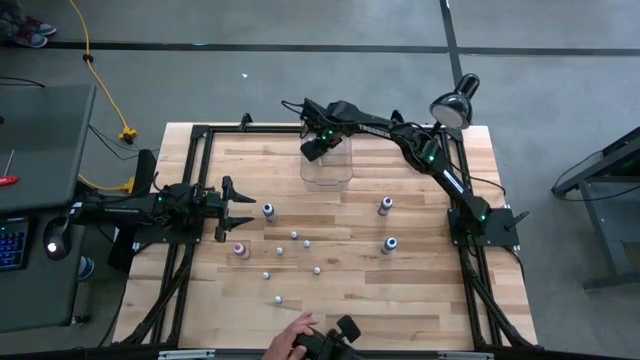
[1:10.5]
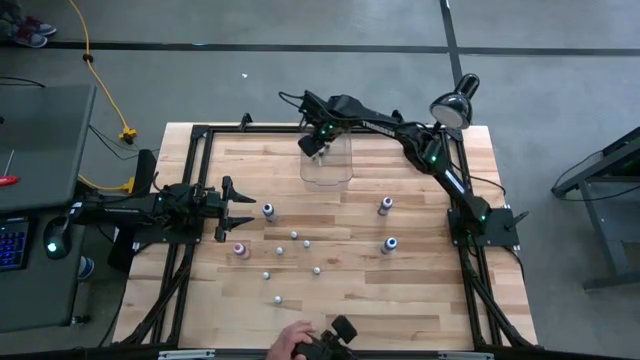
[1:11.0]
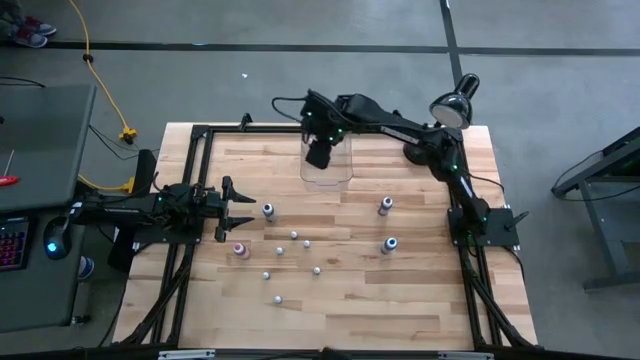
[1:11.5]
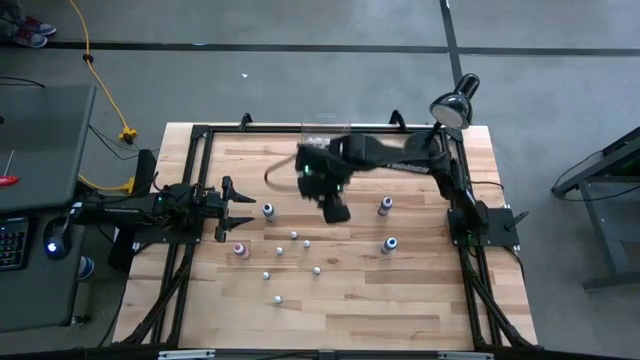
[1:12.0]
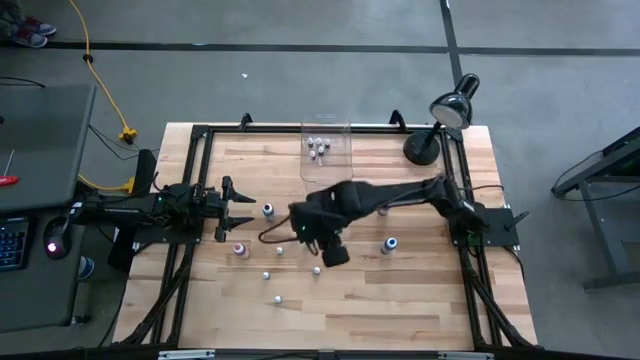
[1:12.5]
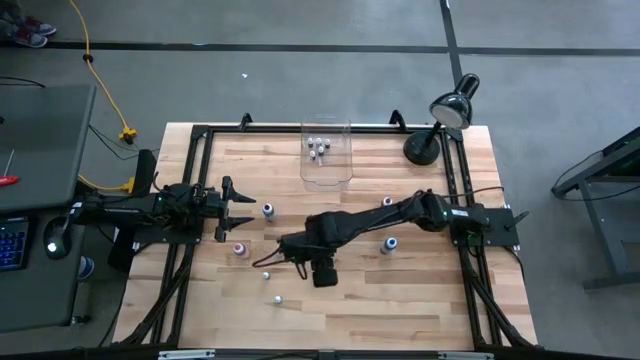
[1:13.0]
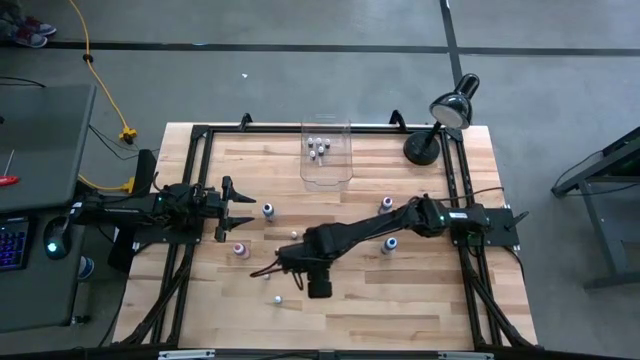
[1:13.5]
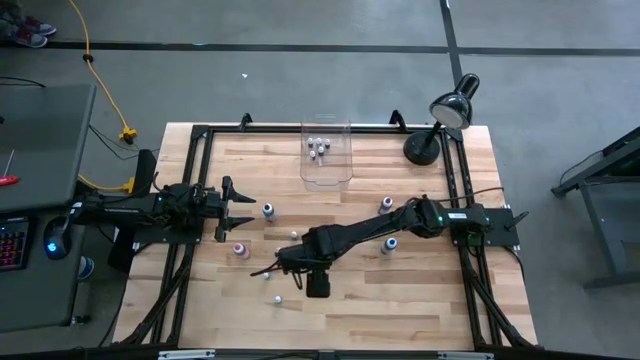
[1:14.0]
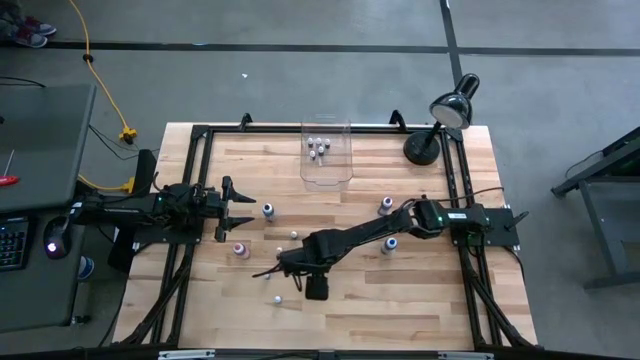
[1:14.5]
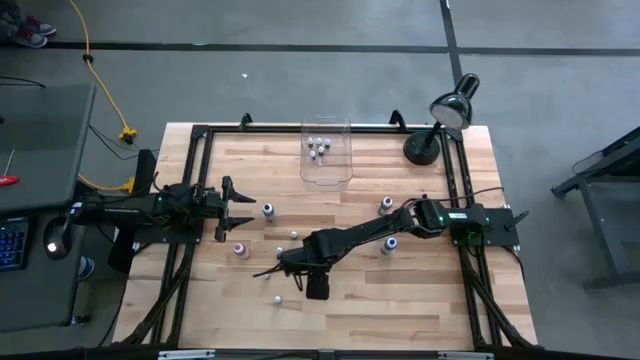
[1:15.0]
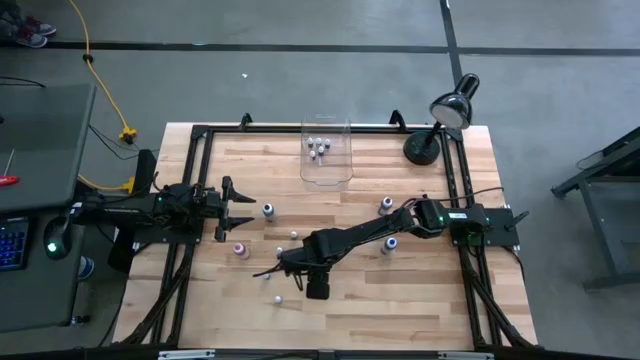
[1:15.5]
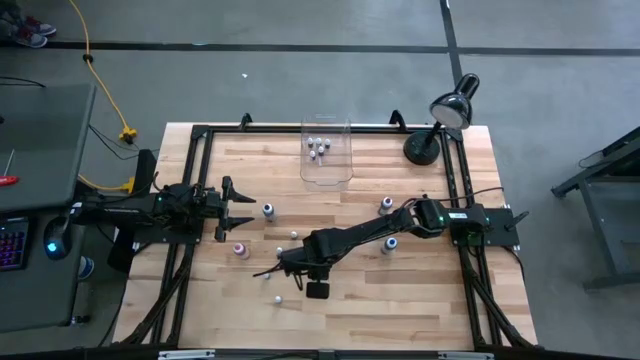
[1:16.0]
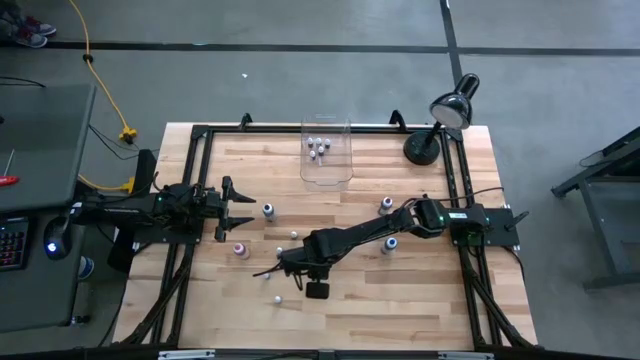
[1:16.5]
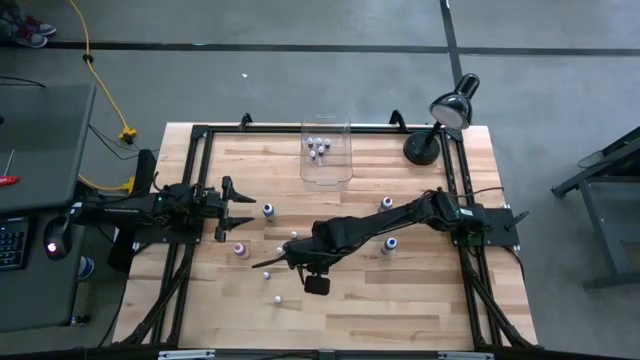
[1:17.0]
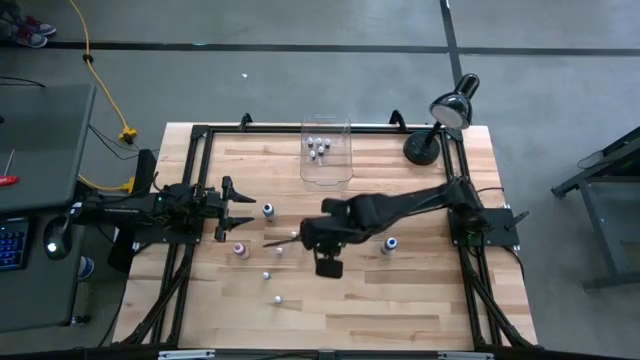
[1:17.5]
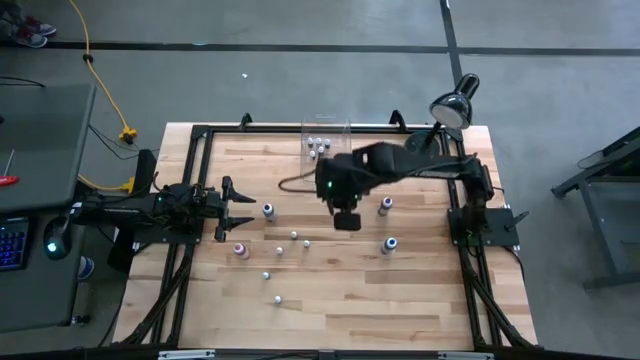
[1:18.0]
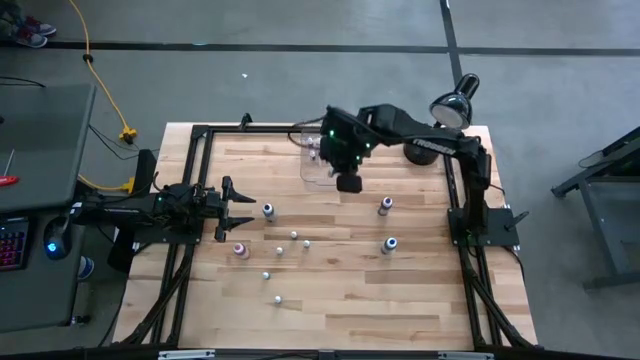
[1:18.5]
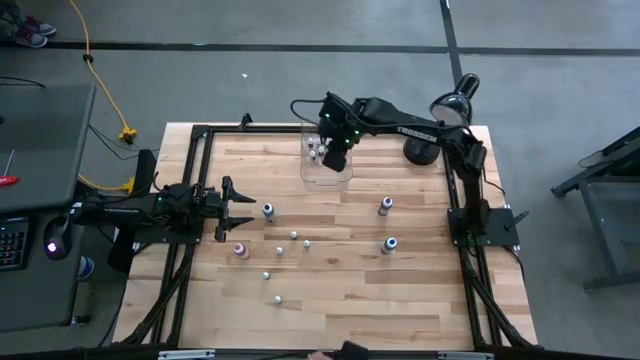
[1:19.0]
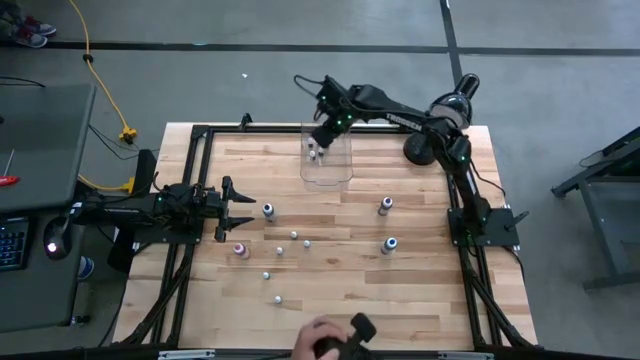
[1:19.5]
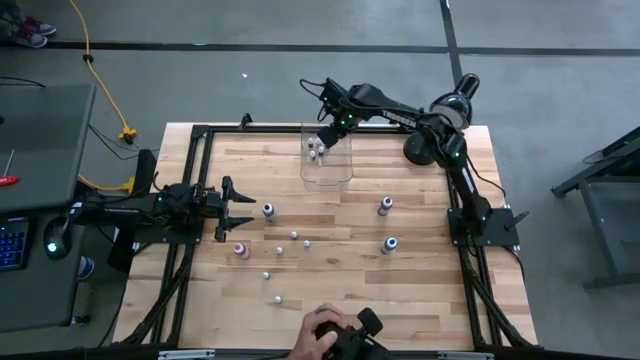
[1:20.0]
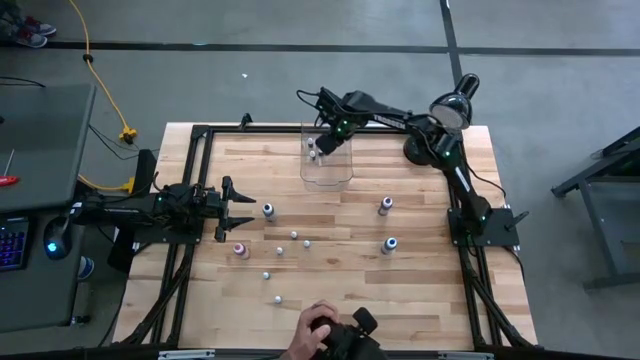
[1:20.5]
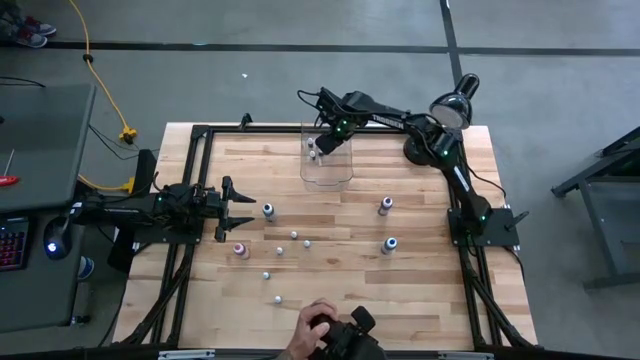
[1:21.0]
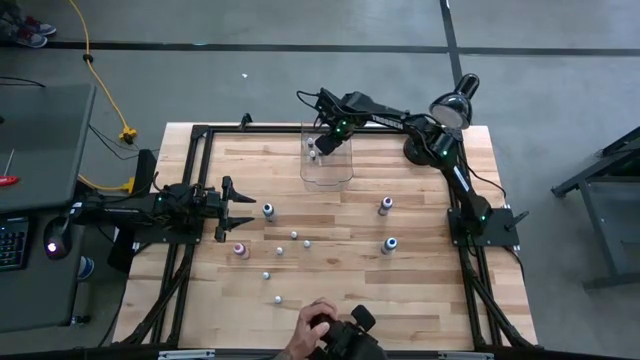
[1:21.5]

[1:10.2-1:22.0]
Task: Pick & Place food coloring
Put the small food coloring bottle into the transparent bin

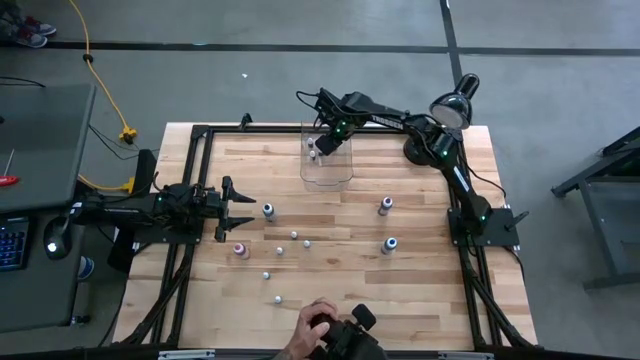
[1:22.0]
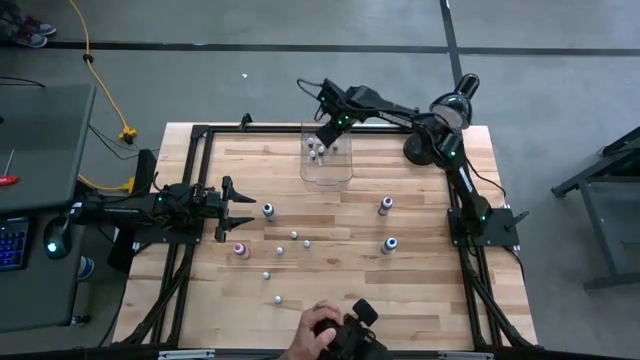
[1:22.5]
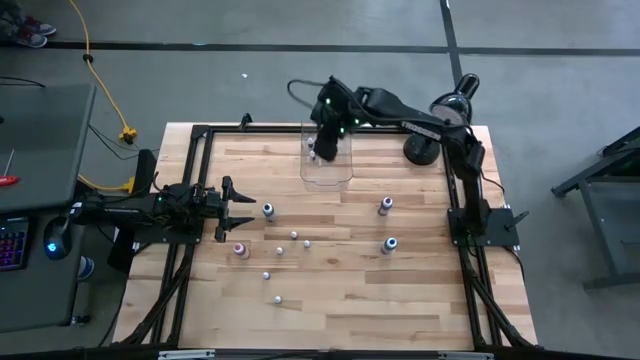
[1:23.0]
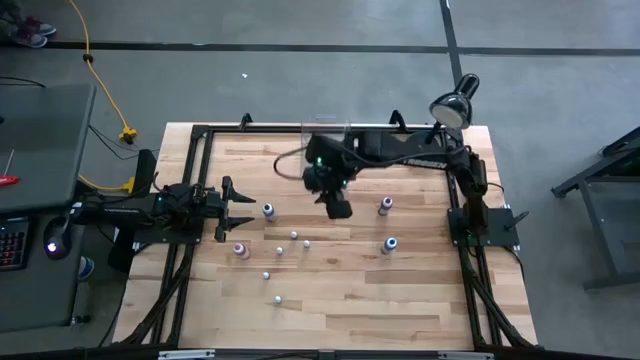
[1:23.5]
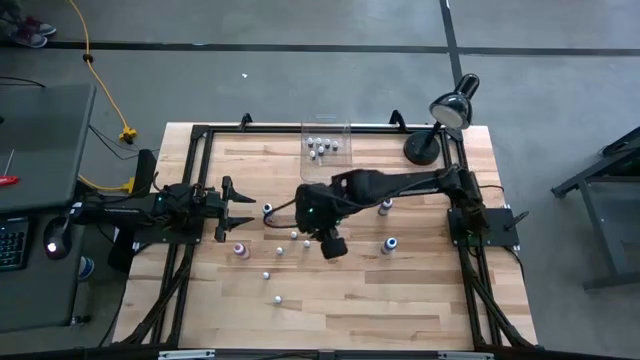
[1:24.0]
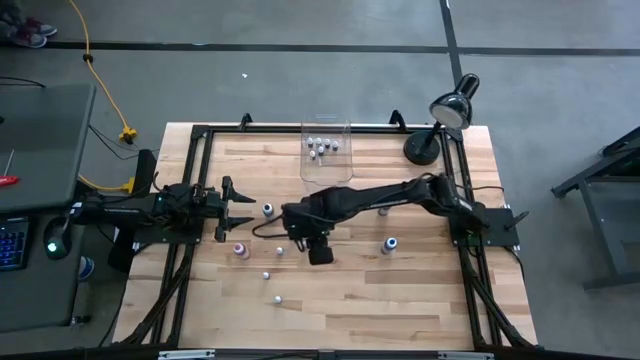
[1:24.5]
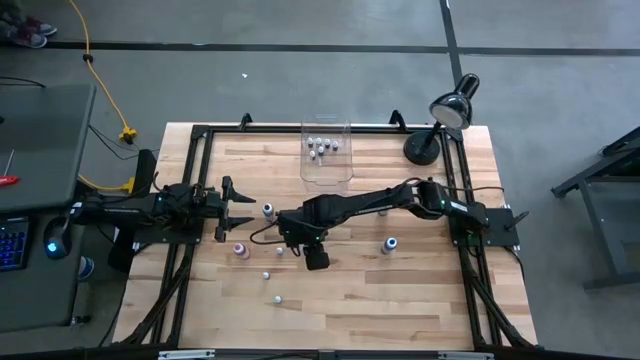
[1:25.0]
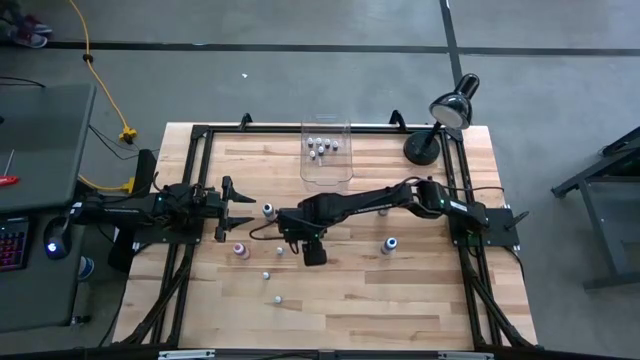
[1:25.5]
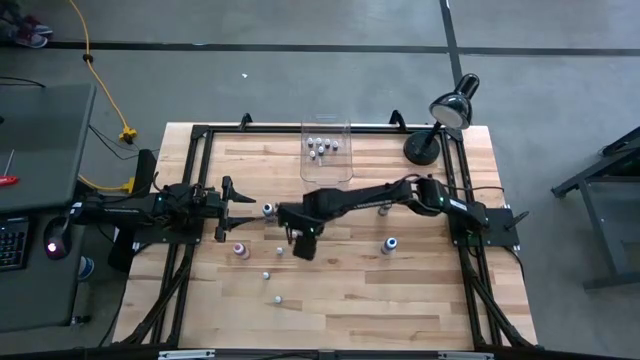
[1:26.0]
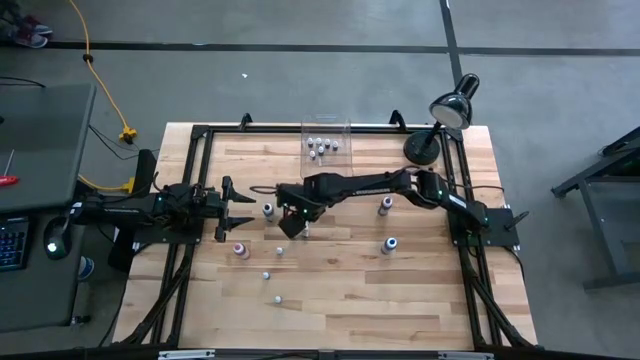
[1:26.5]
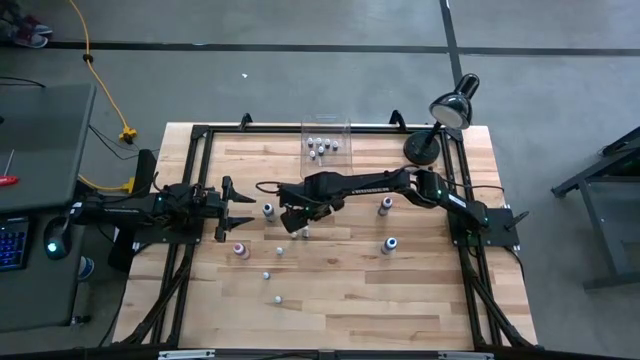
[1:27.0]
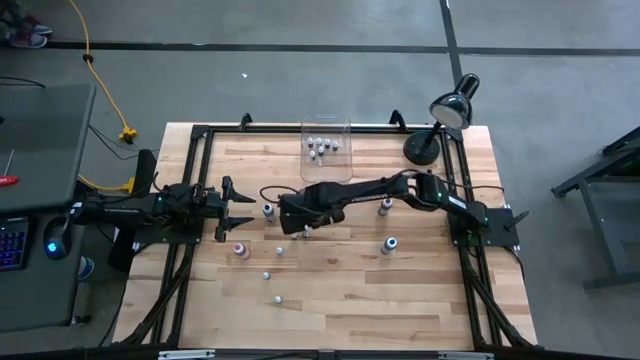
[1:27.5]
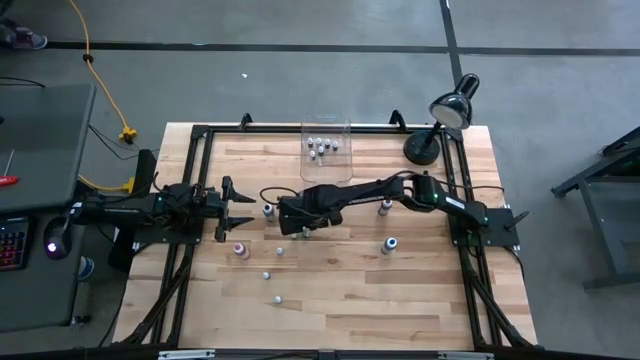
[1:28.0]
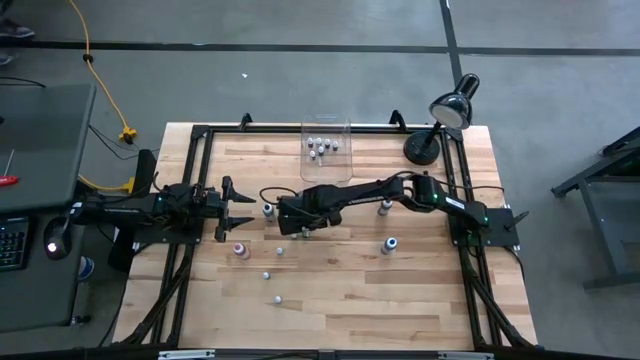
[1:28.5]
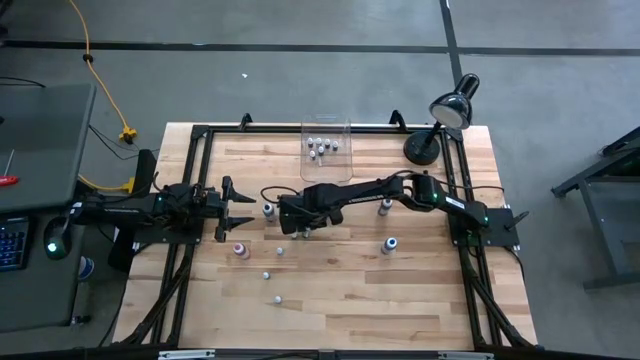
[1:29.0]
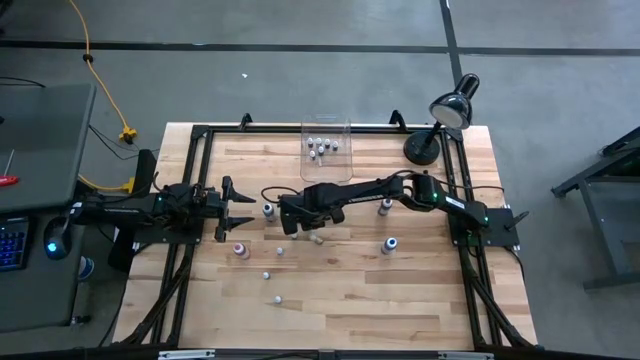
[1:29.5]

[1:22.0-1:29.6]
Put the small food coloring bottle into the transparent bin

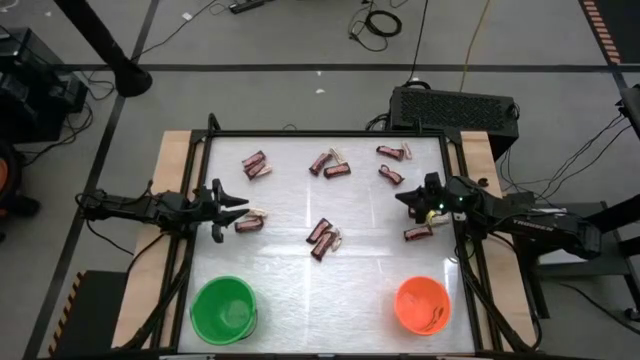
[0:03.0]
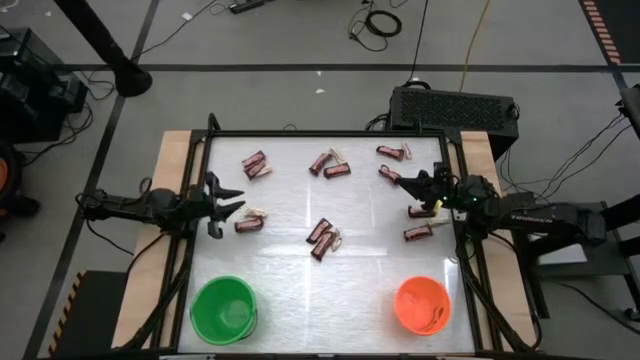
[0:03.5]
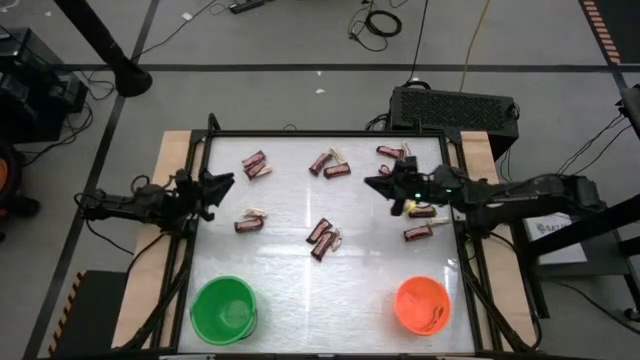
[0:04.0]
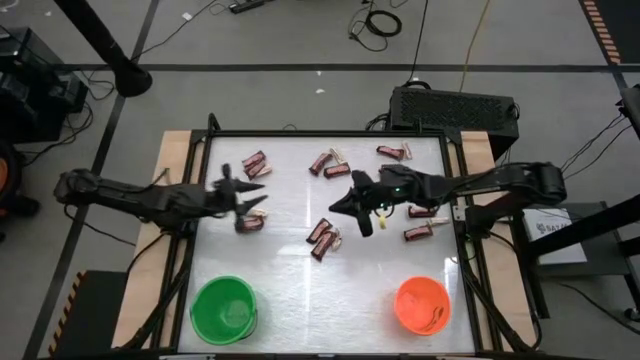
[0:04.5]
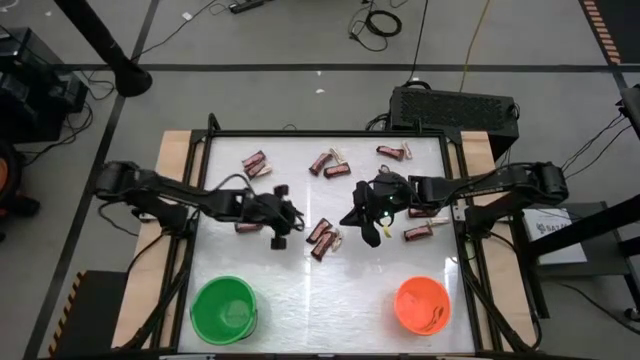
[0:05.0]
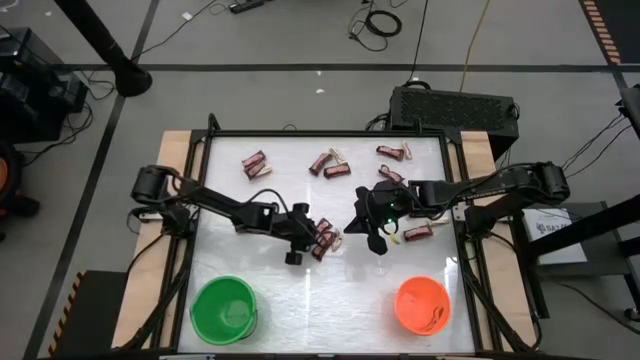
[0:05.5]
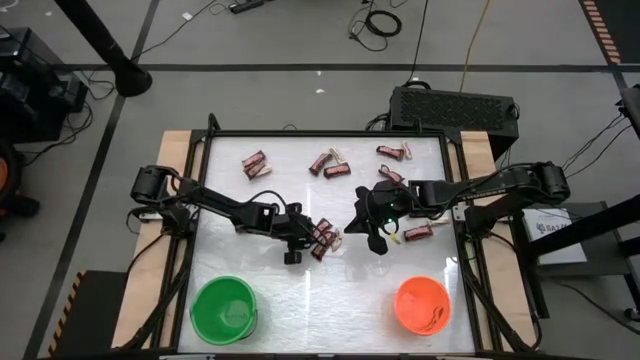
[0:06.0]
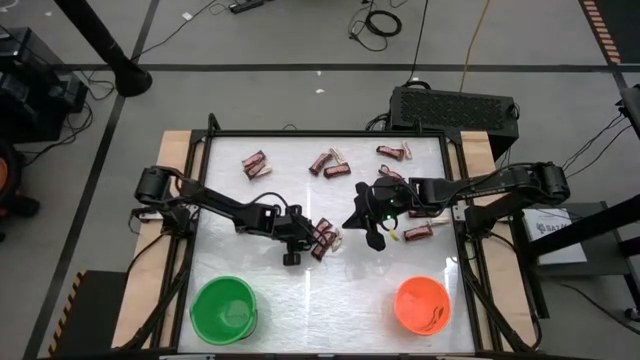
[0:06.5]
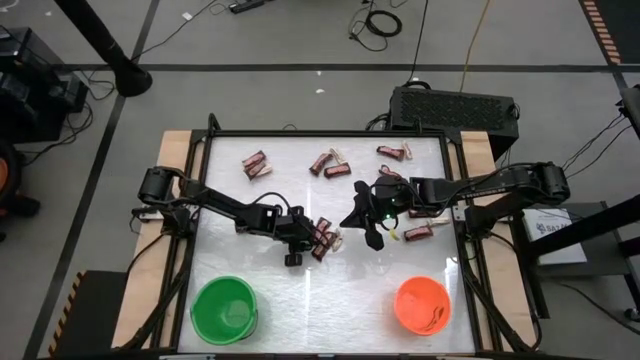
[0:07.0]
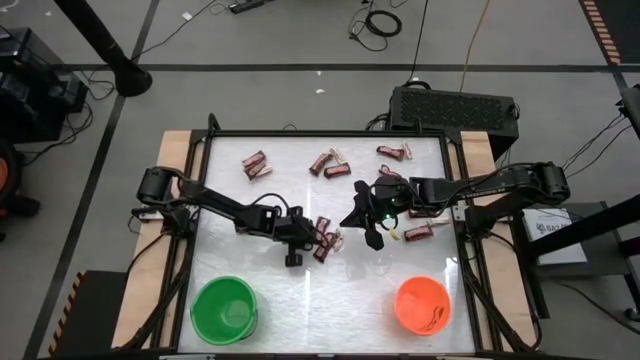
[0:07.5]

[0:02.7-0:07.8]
Task: Sort candy by brand, put in halloween buckets
Put the brown chocolate bar into the green bucket
